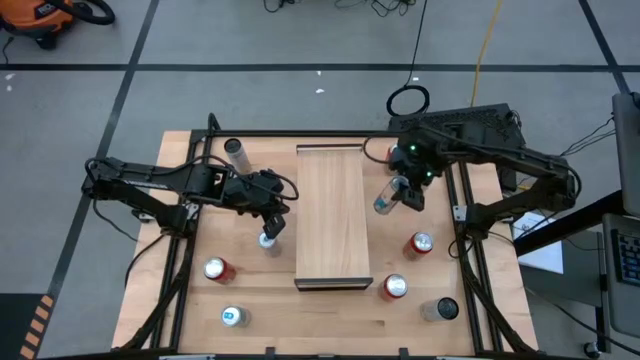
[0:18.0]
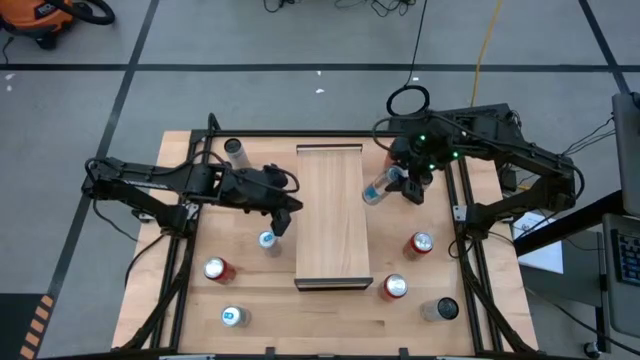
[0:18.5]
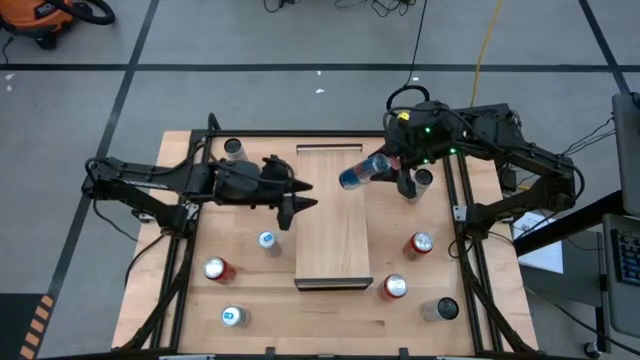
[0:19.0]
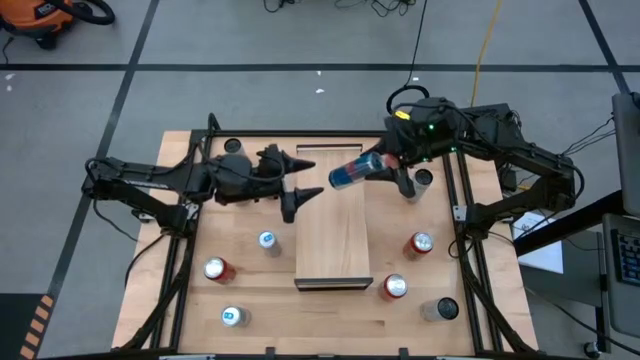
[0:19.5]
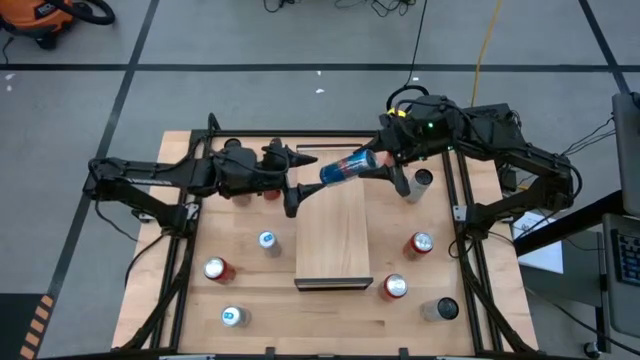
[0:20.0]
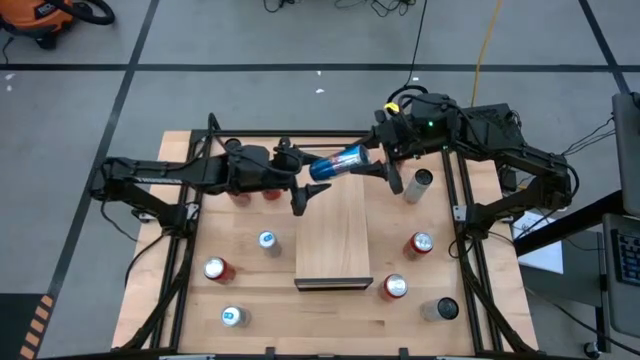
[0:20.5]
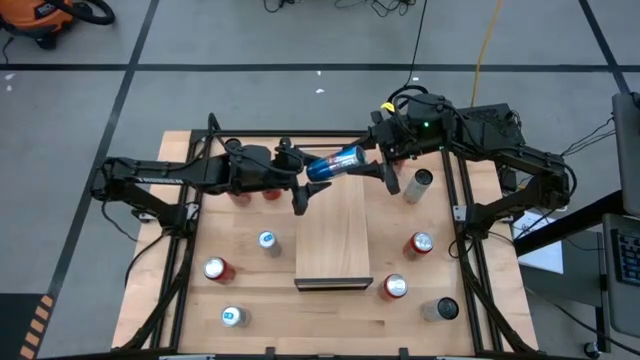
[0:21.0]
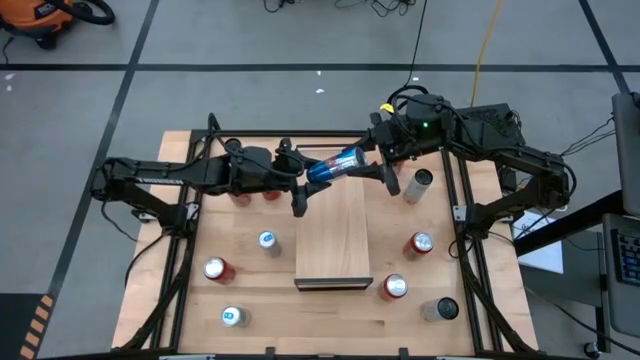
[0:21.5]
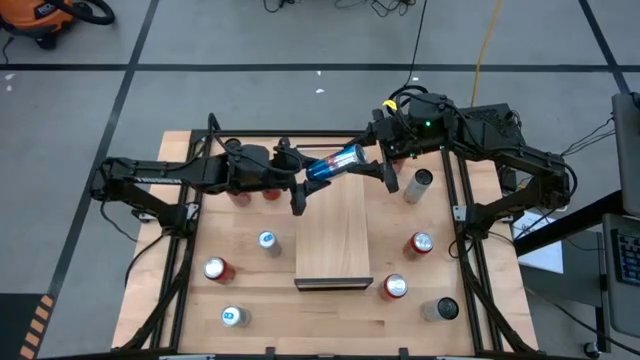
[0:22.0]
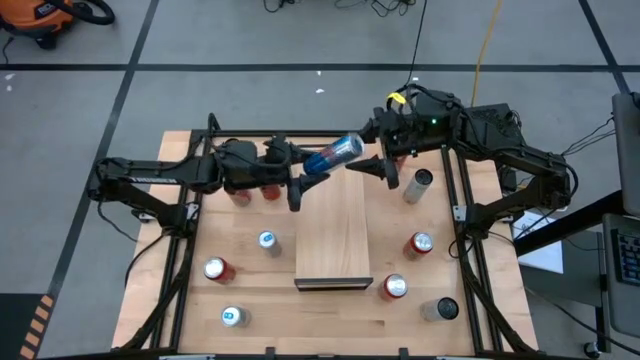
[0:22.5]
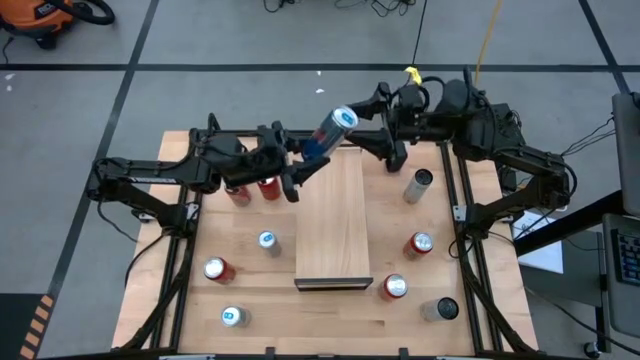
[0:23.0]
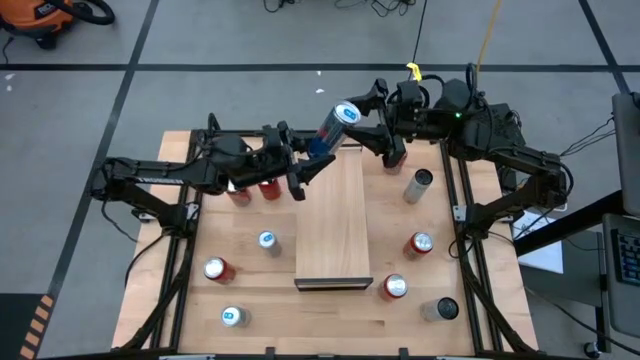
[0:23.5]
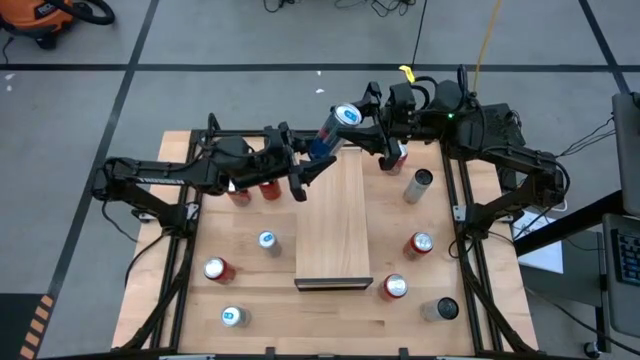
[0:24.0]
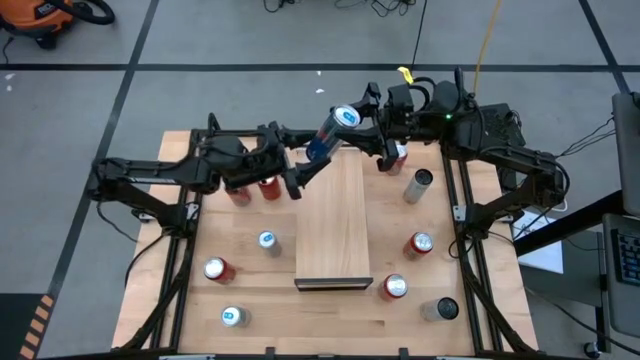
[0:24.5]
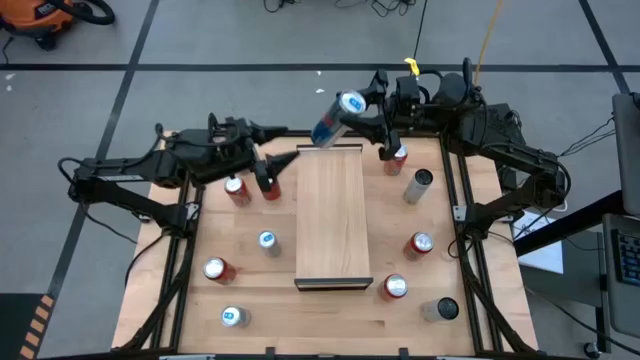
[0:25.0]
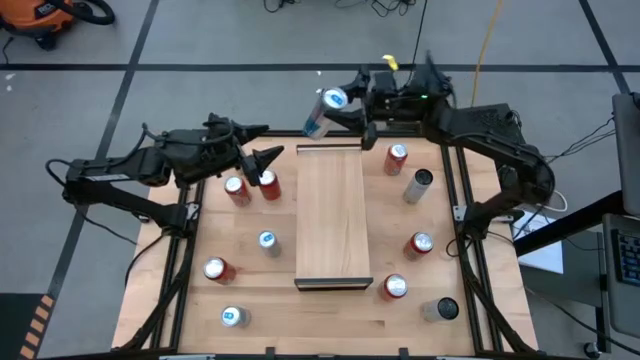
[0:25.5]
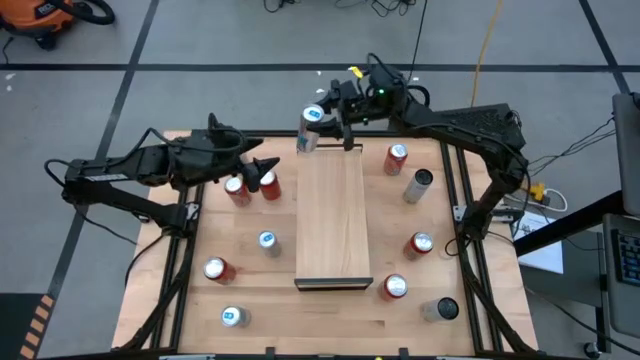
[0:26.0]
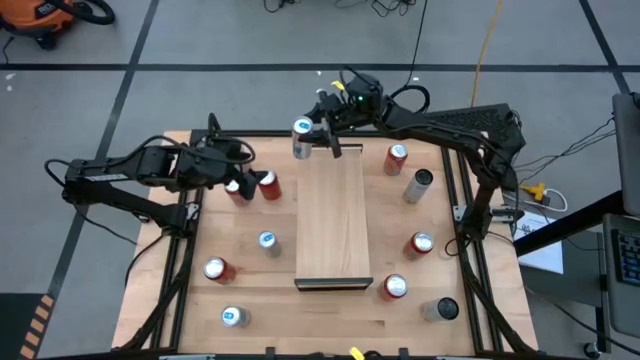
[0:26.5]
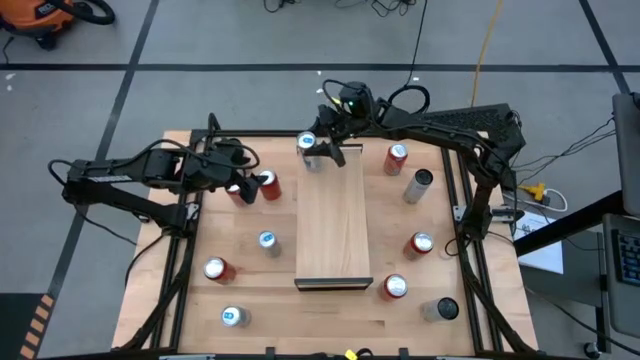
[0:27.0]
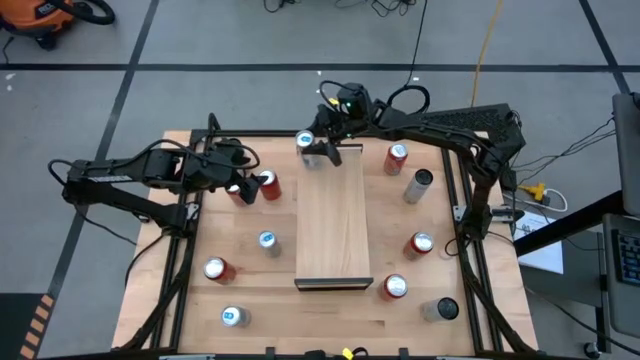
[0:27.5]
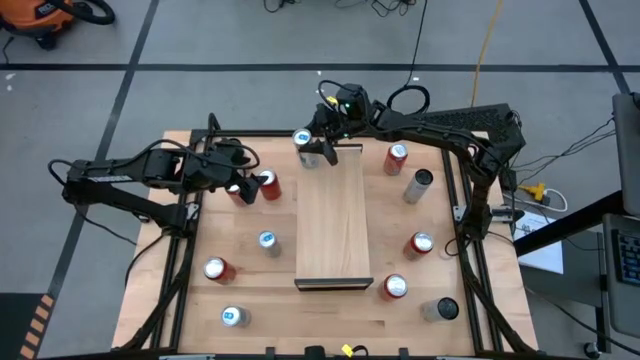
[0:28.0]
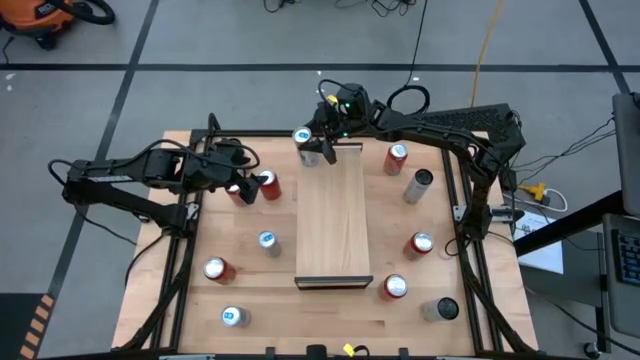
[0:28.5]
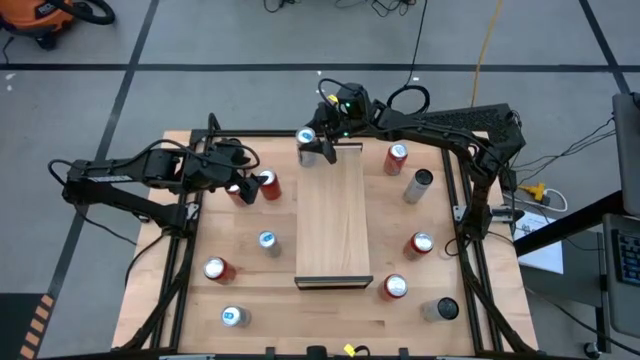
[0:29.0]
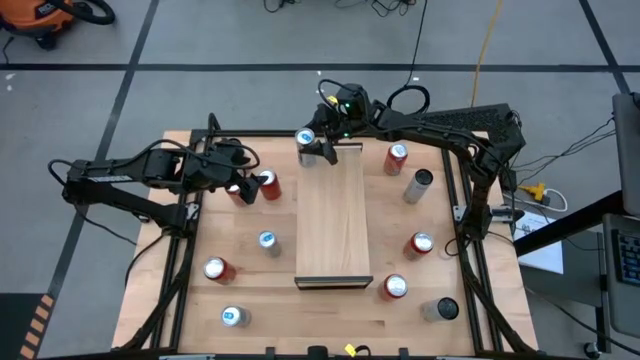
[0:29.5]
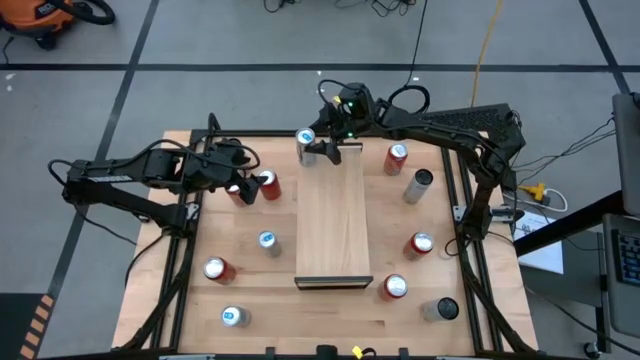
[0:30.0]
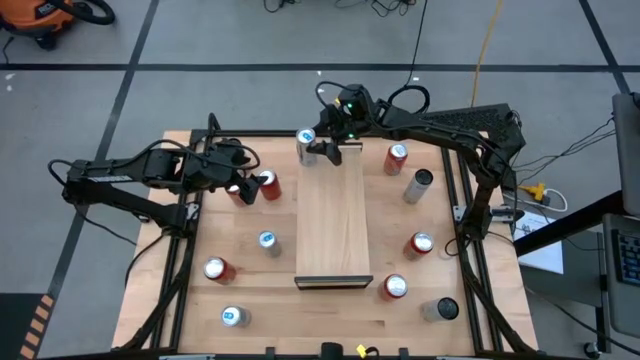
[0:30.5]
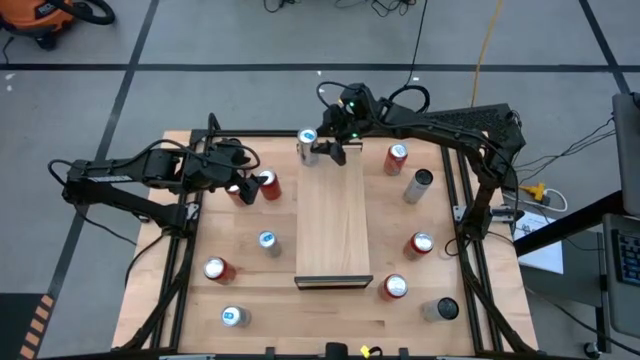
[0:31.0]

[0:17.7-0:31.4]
Task: Place canned beverage on shelf
Put the top right blue soda can on the shelf

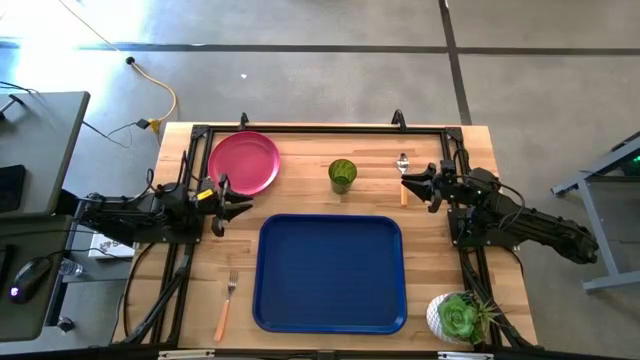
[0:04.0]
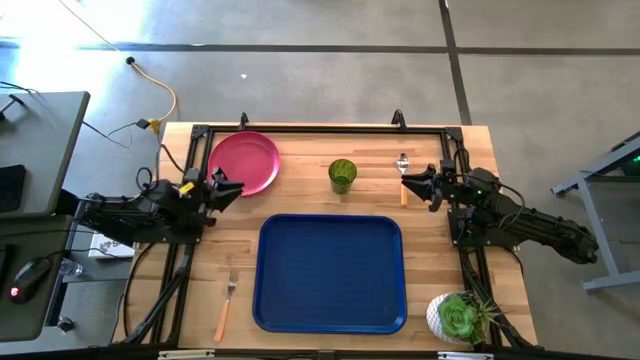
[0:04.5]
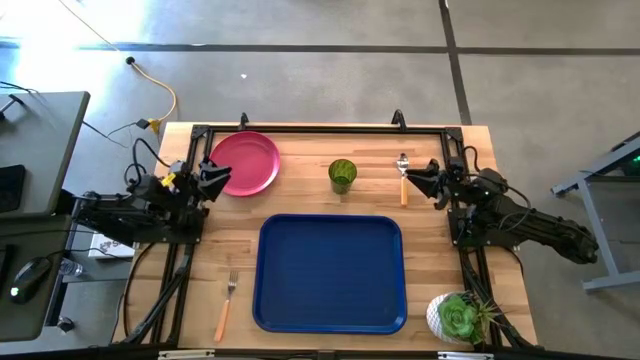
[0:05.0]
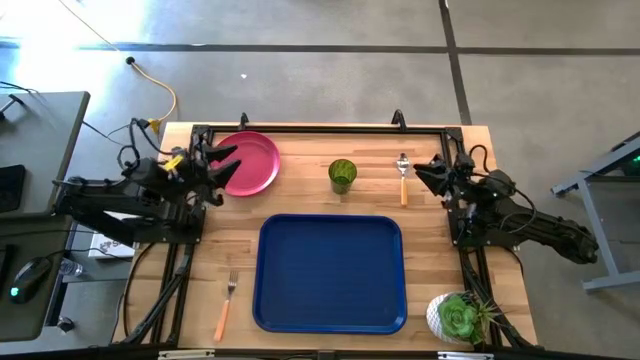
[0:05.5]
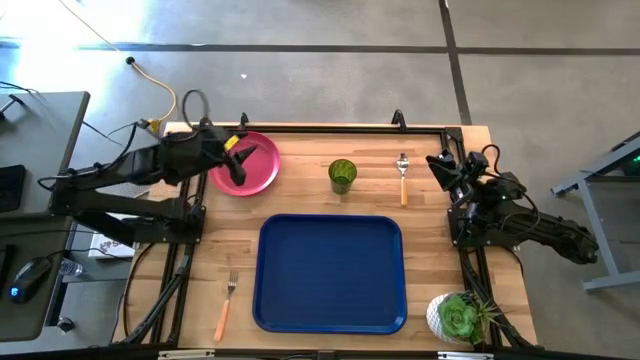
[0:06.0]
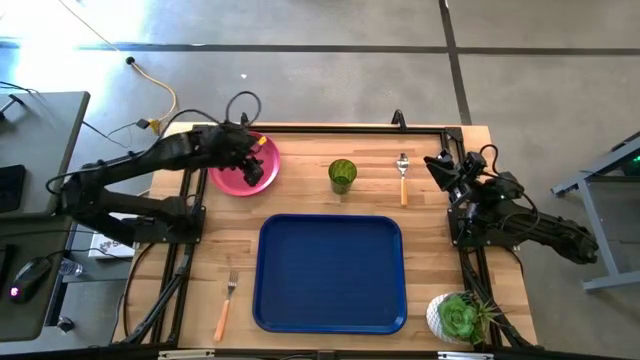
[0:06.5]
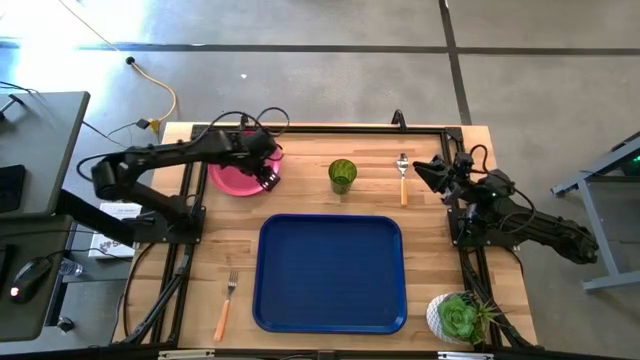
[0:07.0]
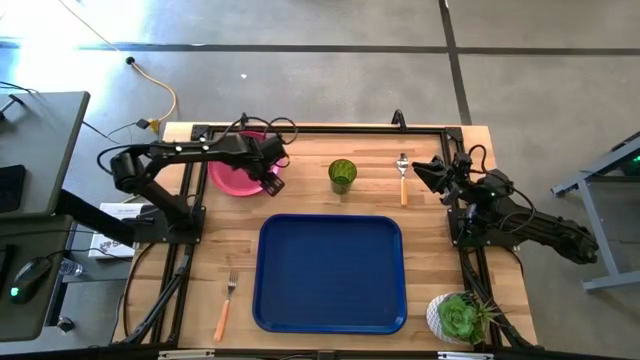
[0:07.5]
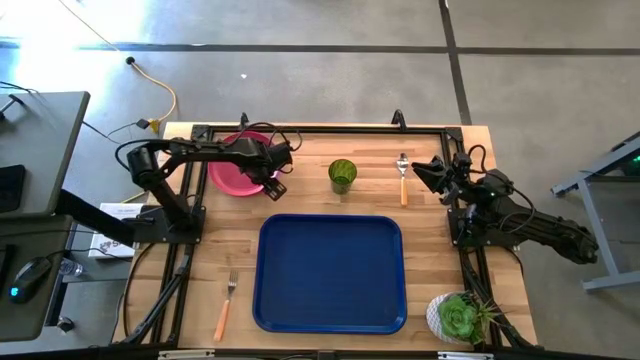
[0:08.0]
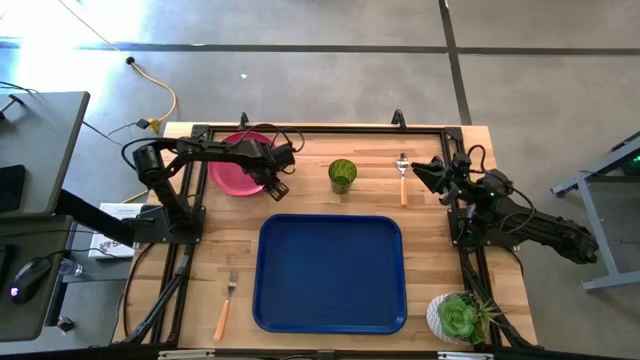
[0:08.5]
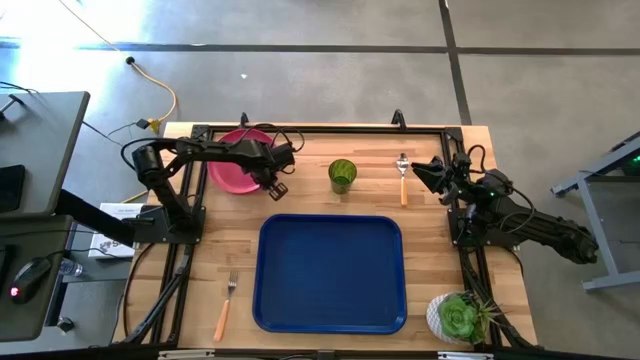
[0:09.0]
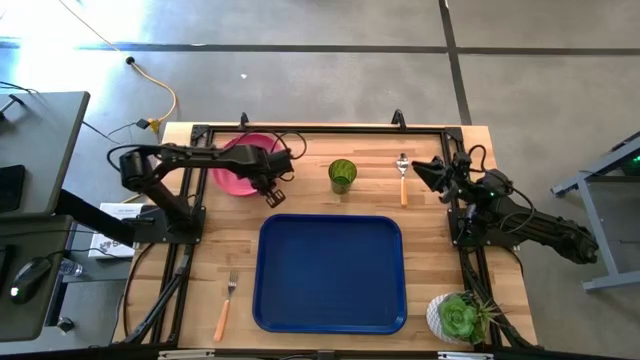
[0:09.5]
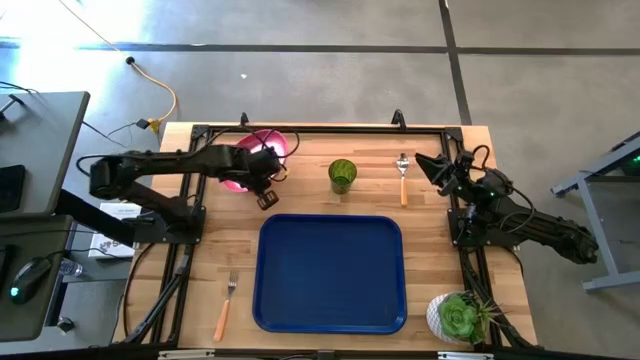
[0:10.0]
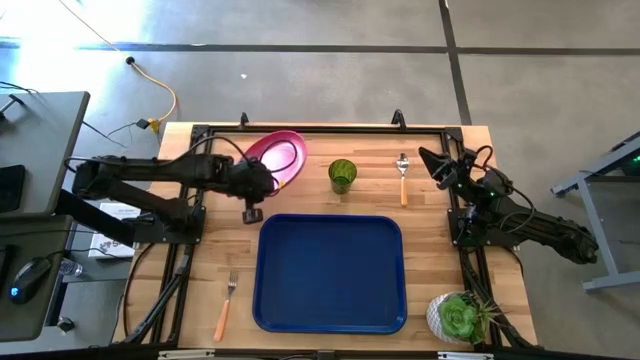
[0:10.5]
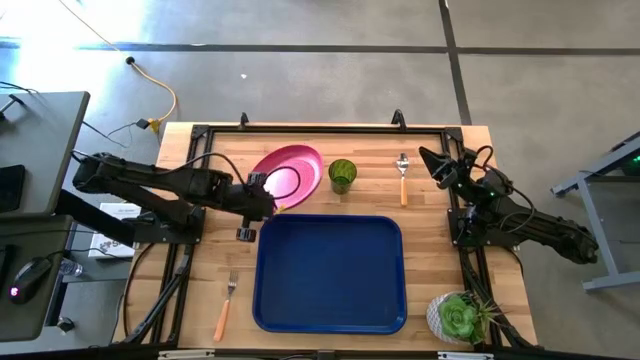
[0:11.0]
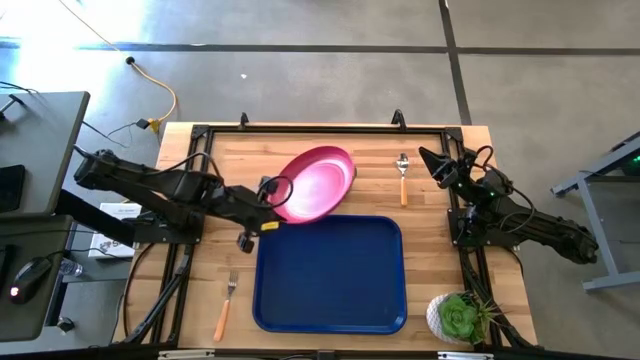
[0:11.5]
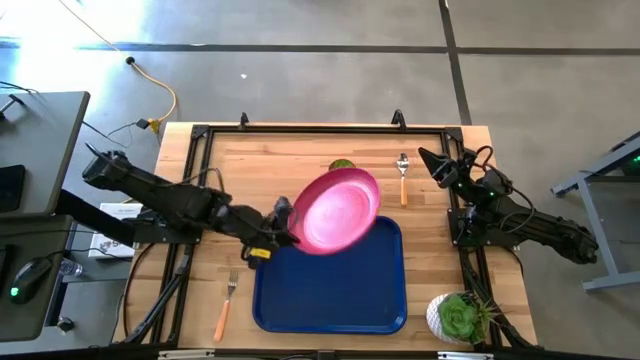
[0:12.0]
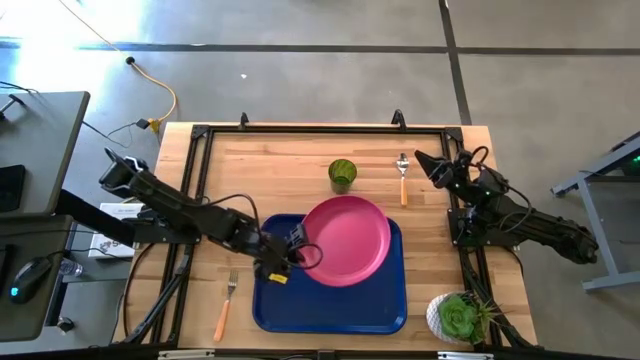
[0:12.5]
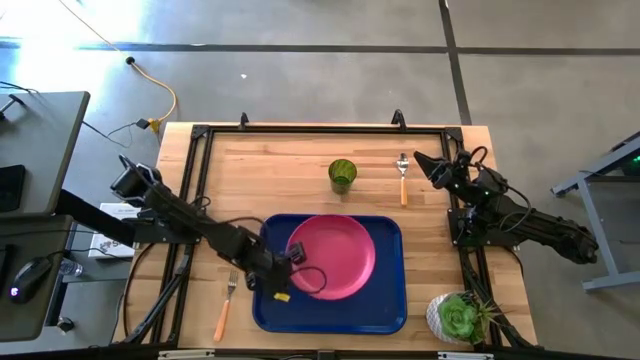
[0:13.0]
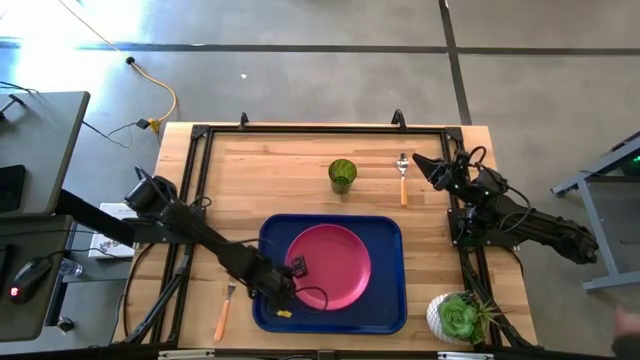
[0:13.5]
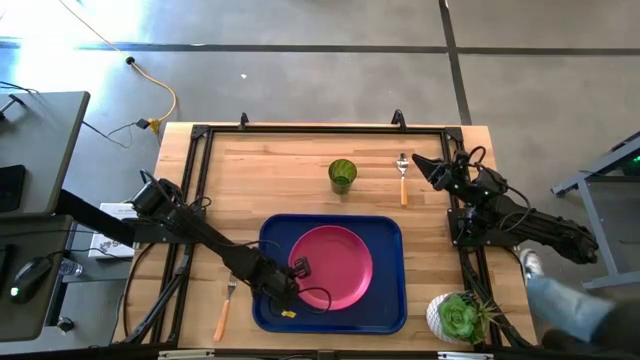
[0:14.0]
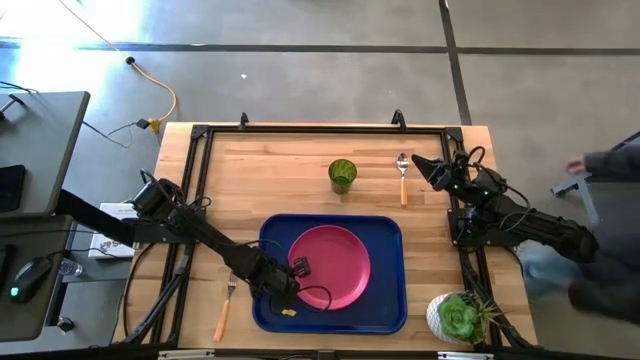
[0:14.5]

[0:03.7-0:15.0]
Task: Pick and place plate/cup/fork/spoon on tray
Put the pink plate on the blue serving tray
